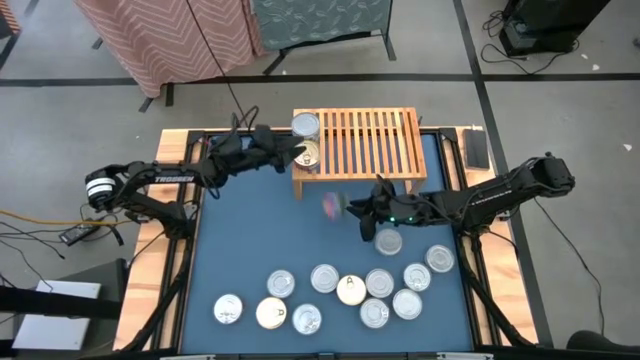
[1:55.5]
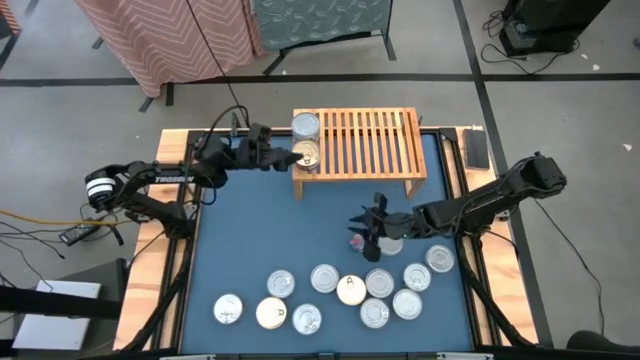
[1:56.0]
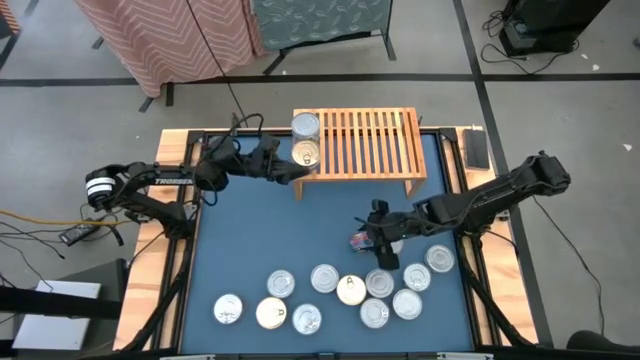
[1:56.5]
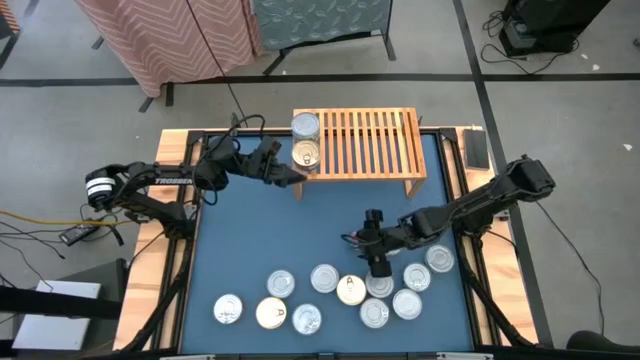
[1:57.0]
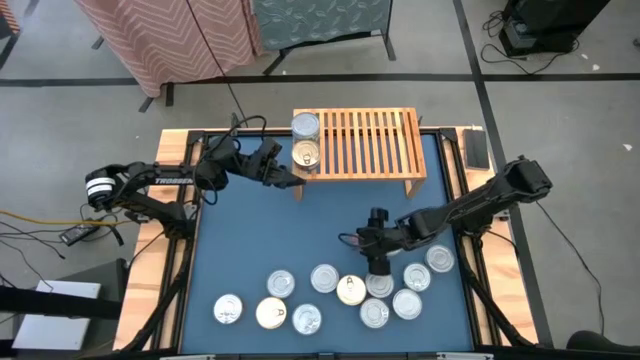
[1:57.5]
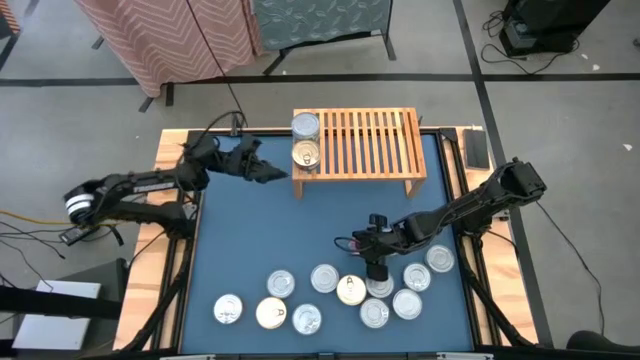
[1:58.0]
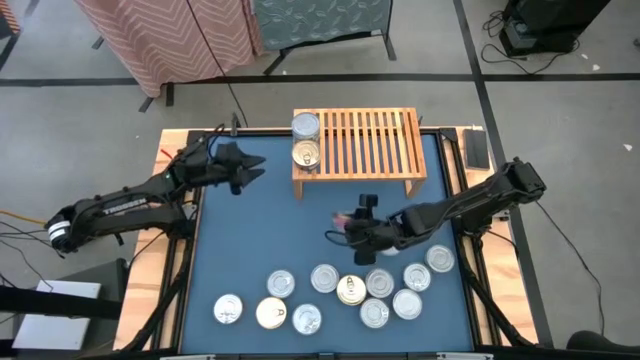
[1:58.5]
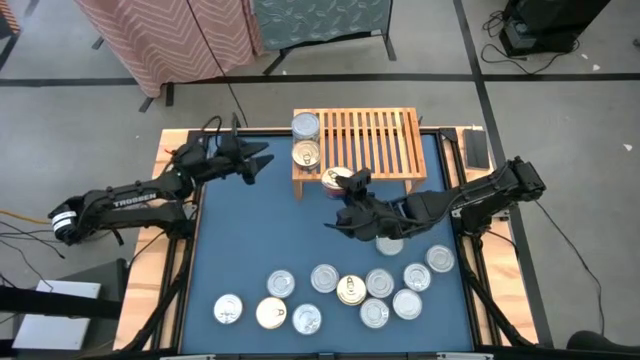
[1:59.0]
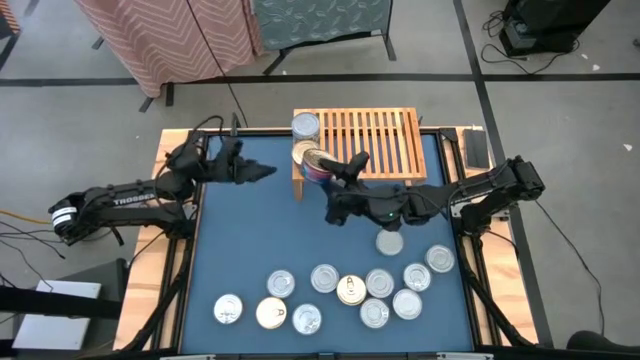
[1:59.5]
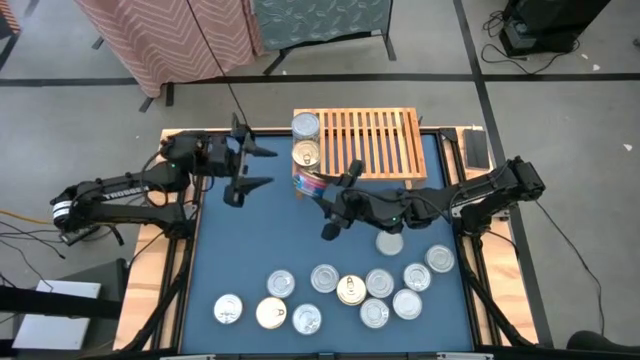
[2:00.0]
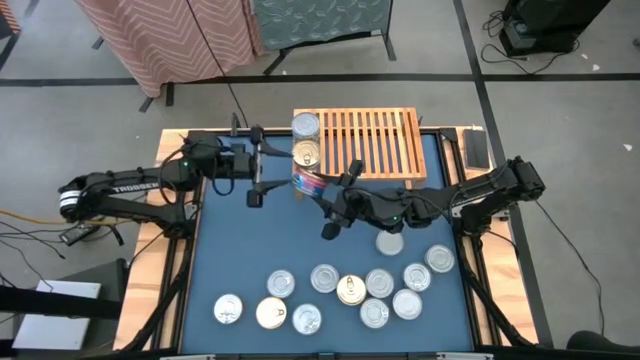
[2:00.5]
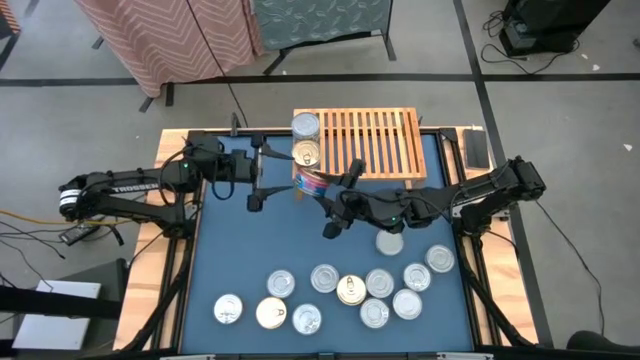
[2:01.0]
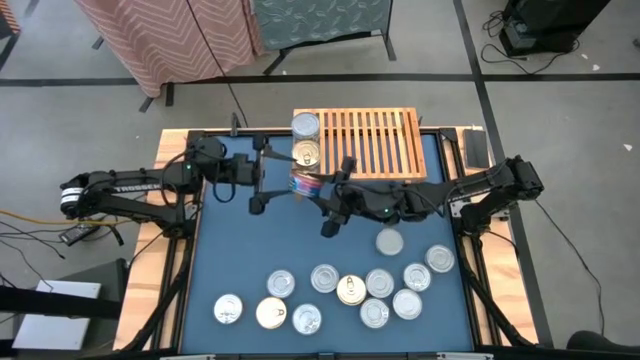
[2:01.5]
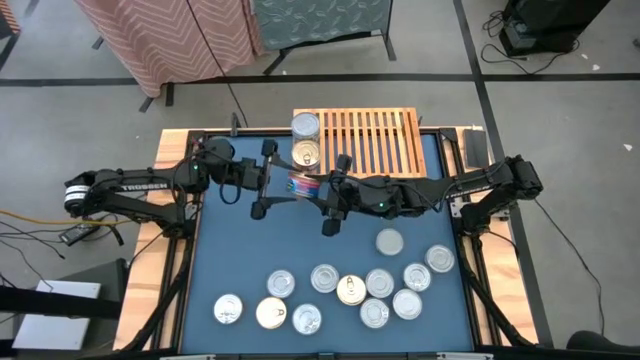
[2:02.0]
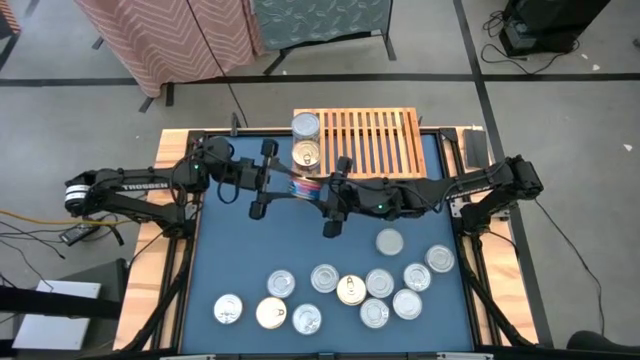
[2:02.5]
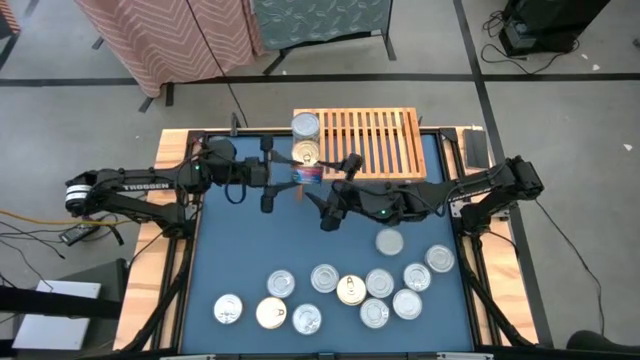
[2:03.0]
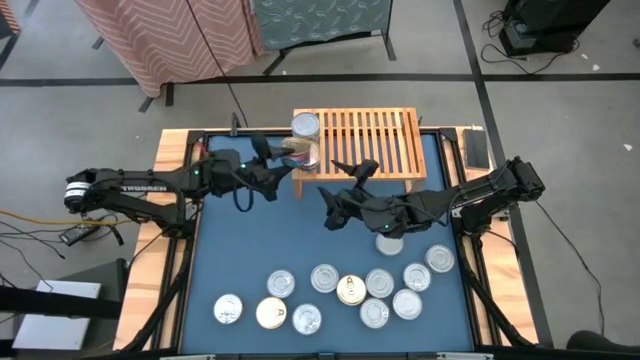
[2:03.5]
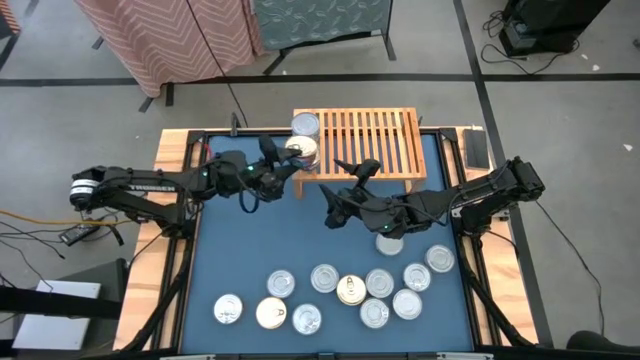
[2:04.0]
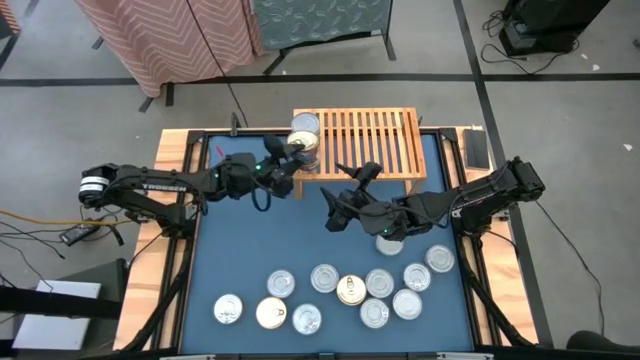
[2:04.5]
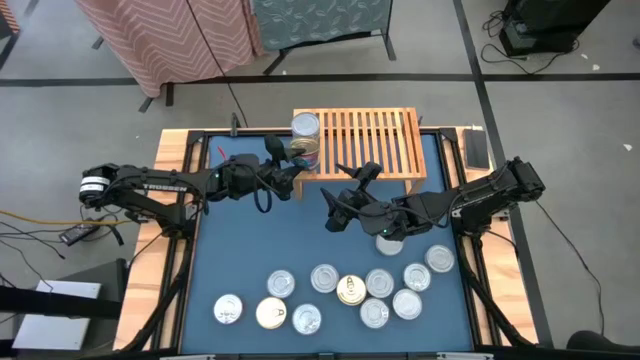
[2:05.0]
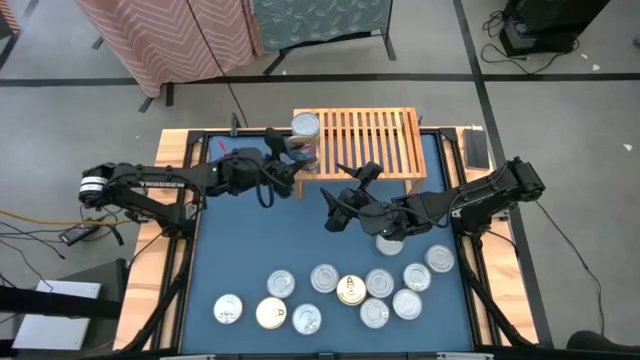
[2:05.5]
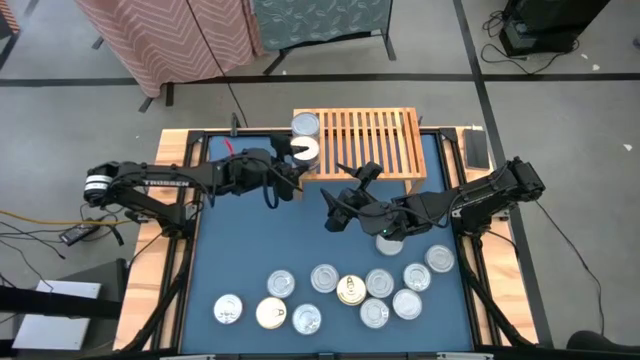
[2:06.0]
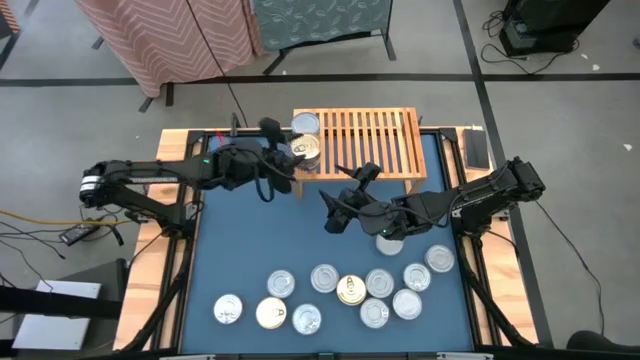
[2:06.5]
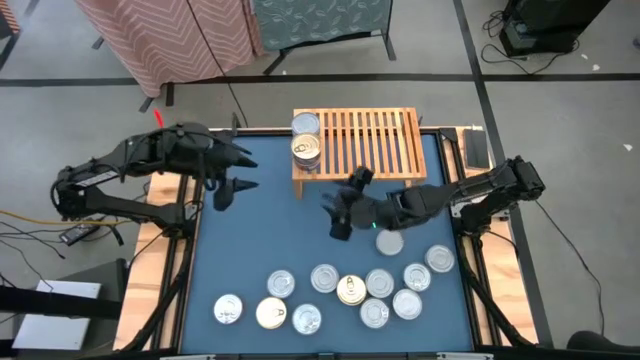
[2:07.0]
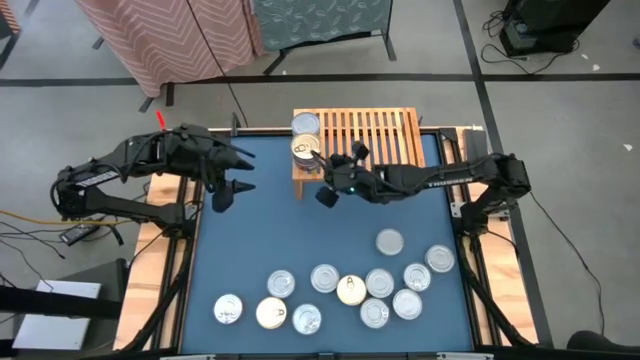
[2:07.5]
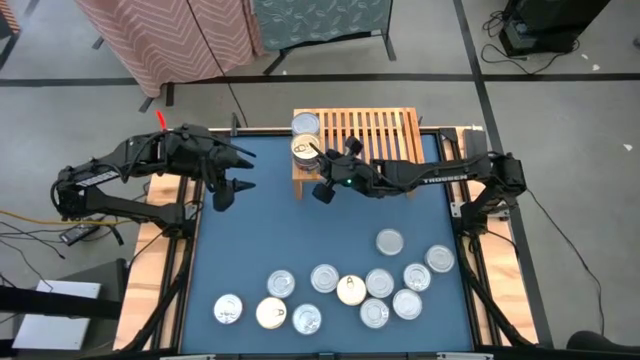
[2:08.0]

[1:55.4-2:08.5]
Task: Stack canned seafood by type on shelf
Stack the blue tuna can on top of the blue tuna can on the shelf

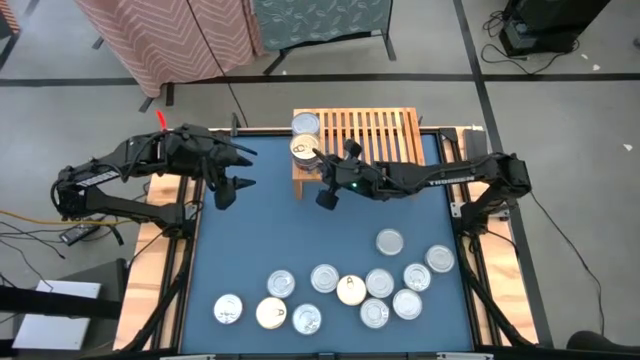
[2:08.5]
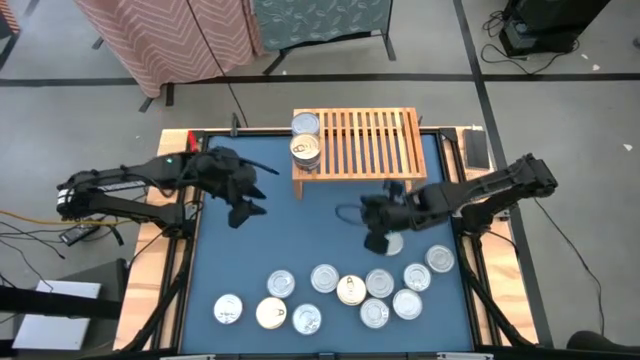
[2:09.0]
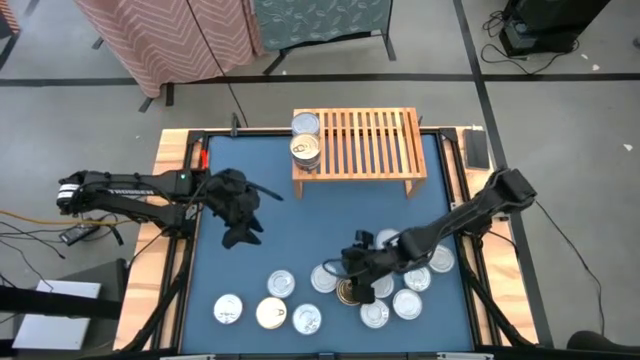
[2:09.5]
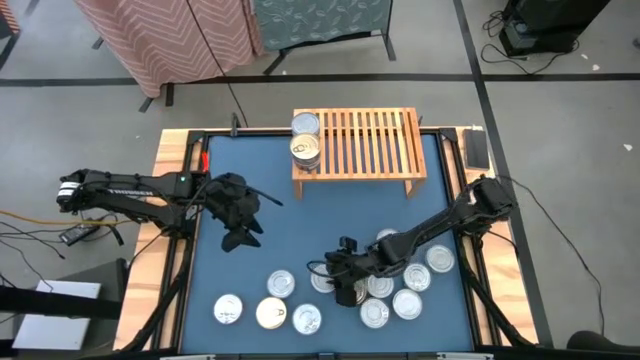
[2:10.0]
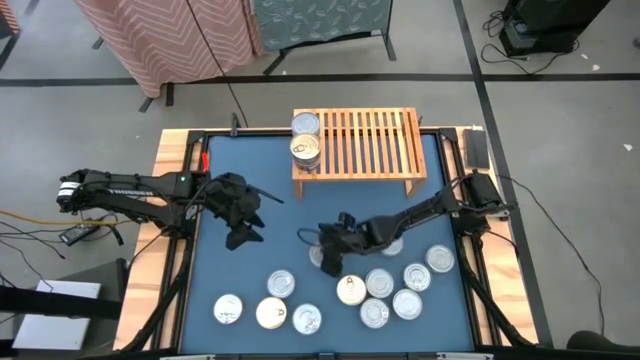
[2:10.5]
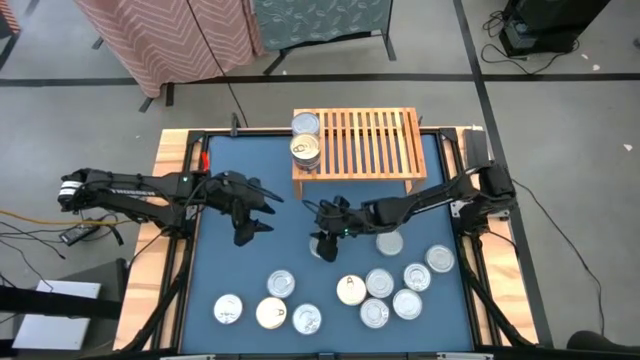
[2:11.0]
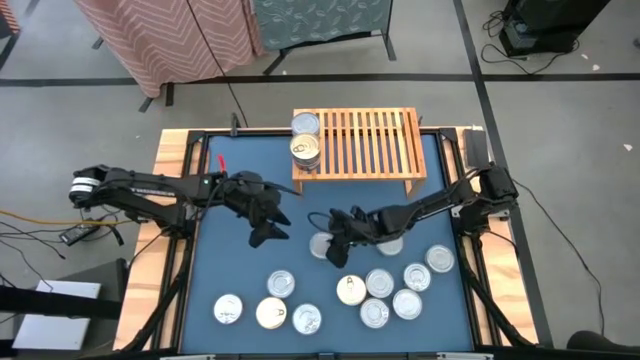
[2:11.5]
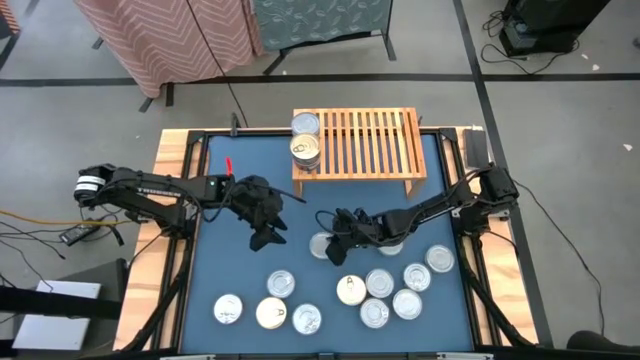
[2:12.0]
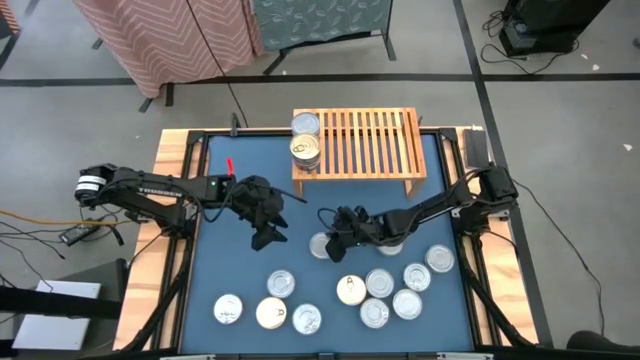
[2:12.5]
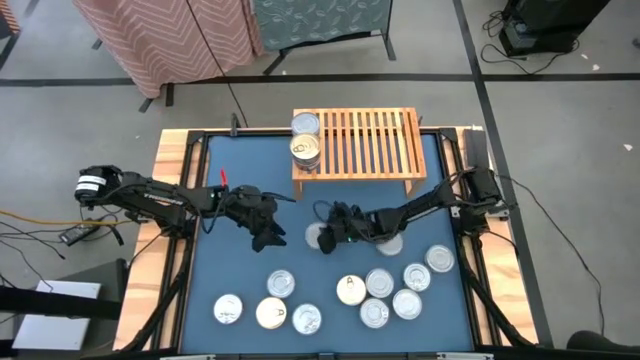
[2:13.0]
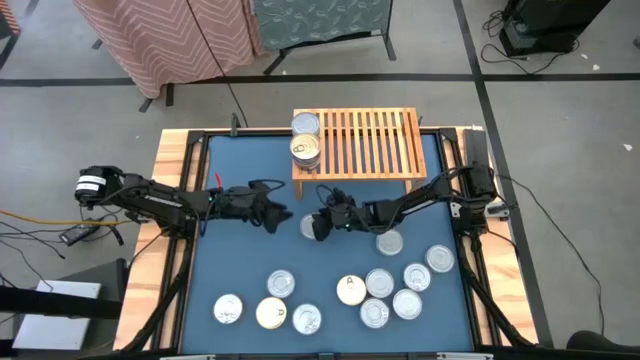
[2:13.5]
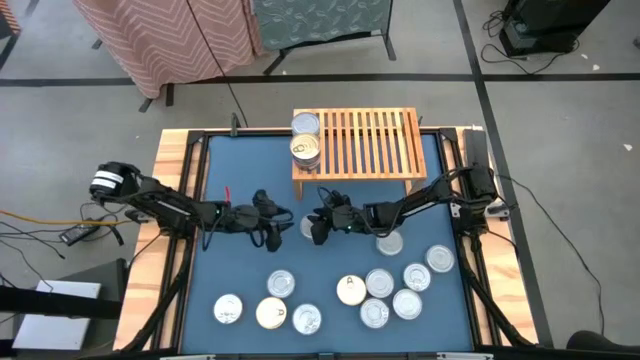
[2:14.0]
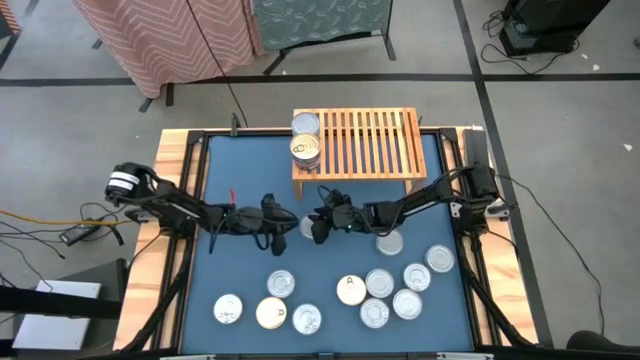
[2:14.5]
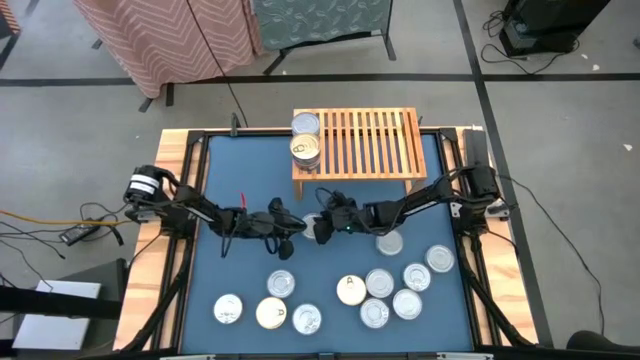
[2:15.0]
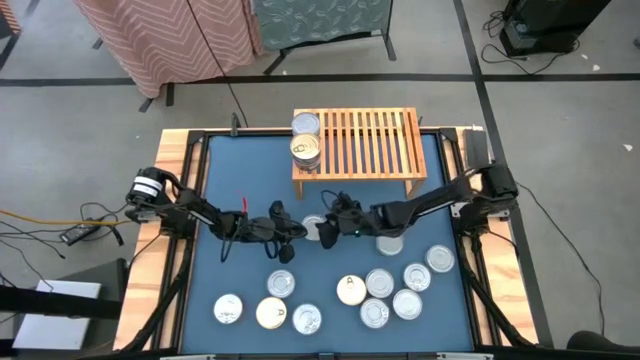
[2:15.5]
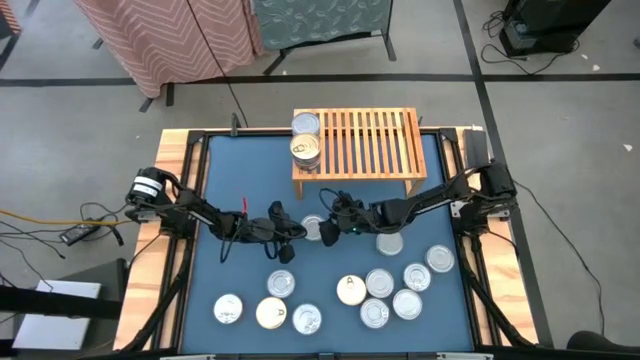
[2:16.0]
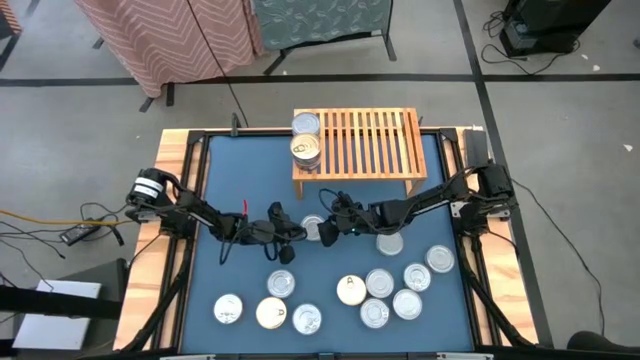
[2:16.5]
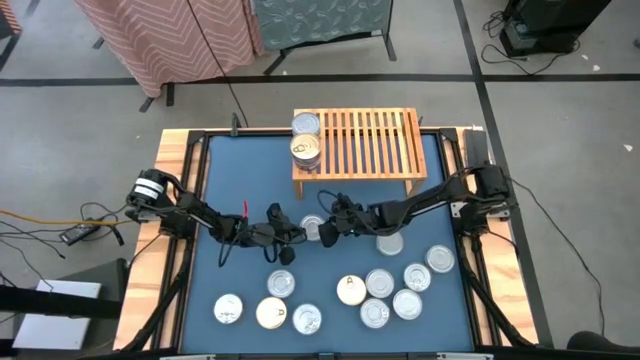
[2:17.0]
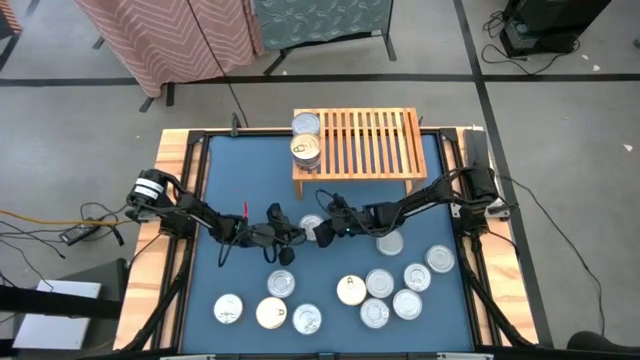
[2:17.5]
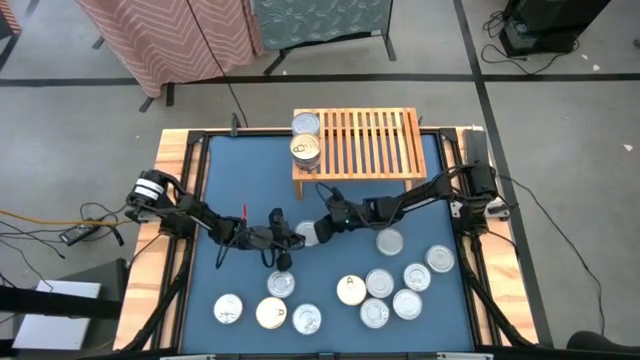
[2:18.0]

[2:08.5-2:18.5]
Stack the green tuna can on top of the other green tuna cans on the shelf
